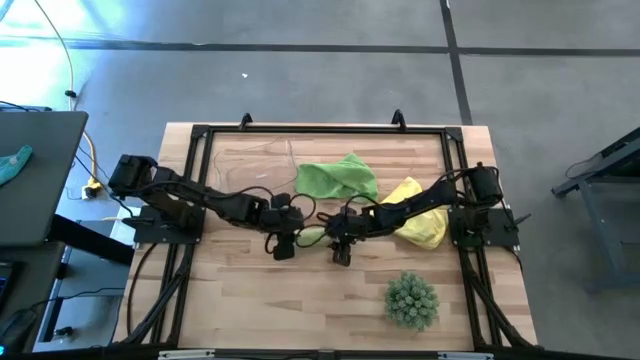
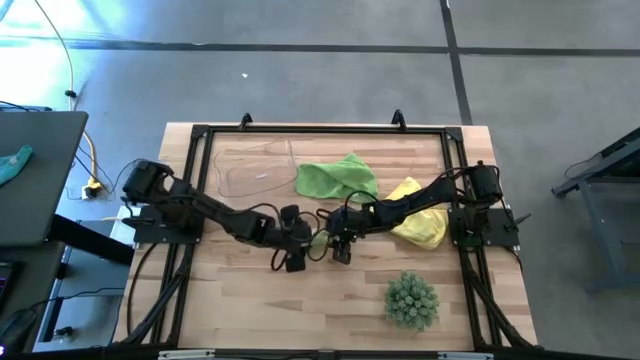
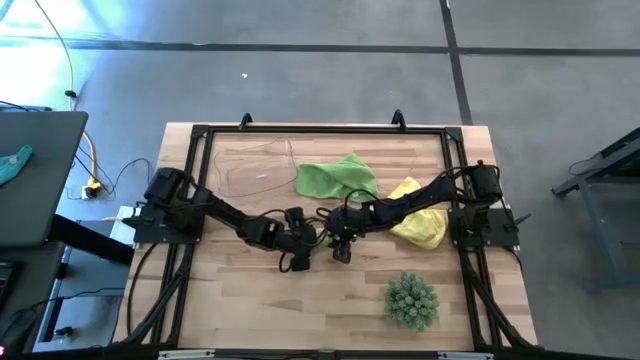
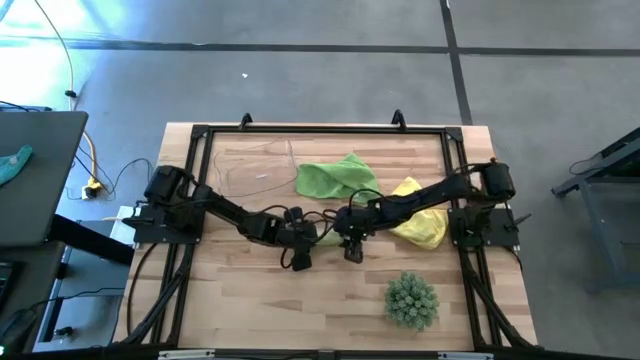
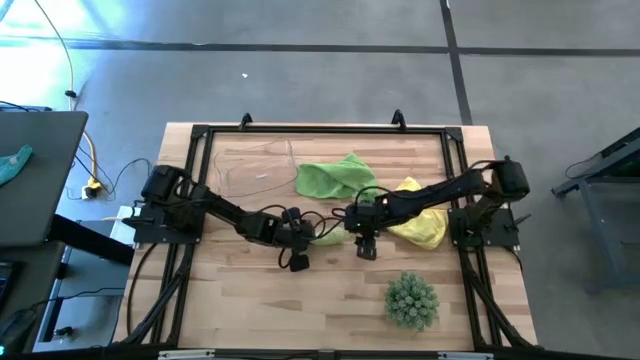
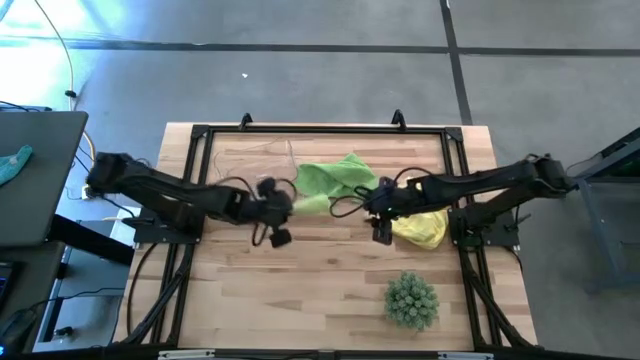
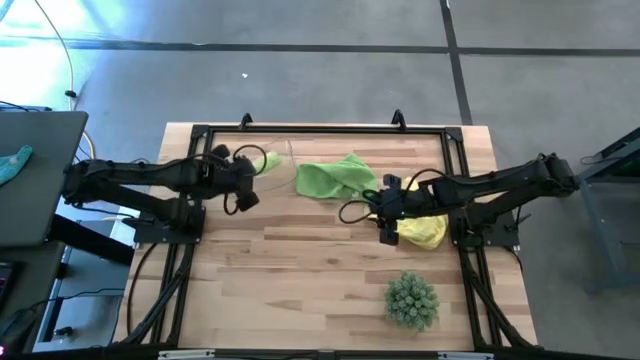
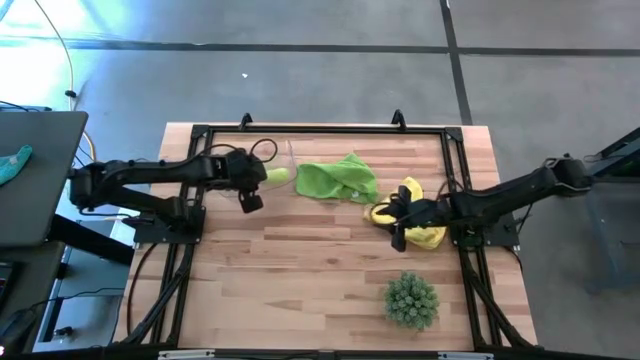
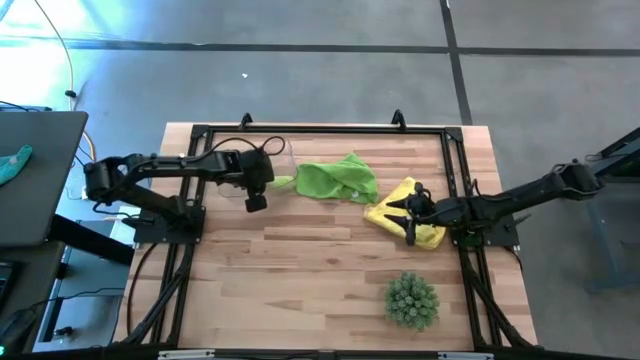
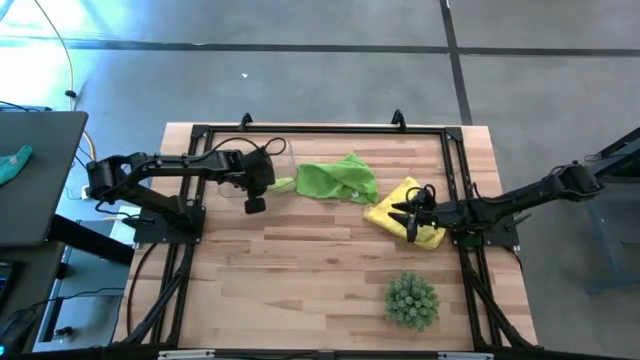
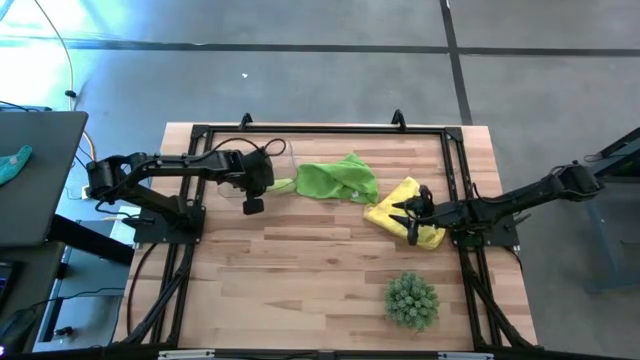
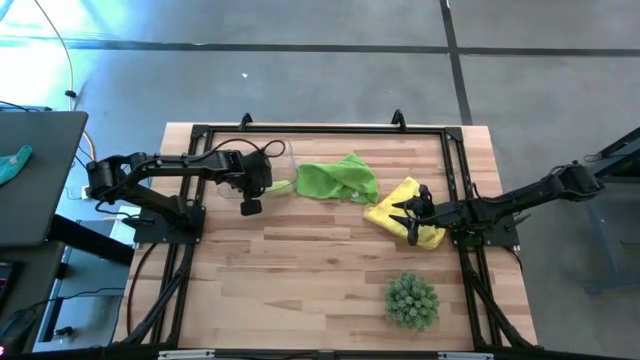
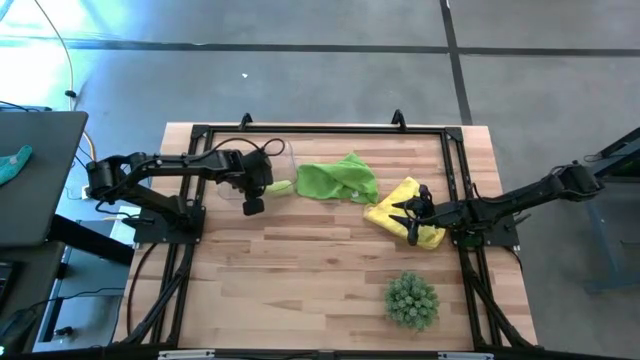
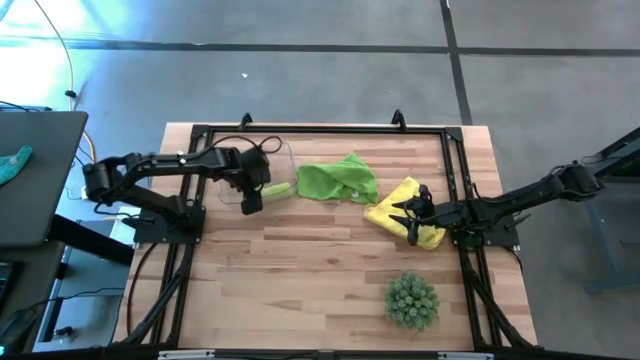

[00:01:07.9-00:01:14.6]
Task: Roll microfiber towels into tight, uniform cylinder then place into a basket
Put the light green towel into the transparent bin

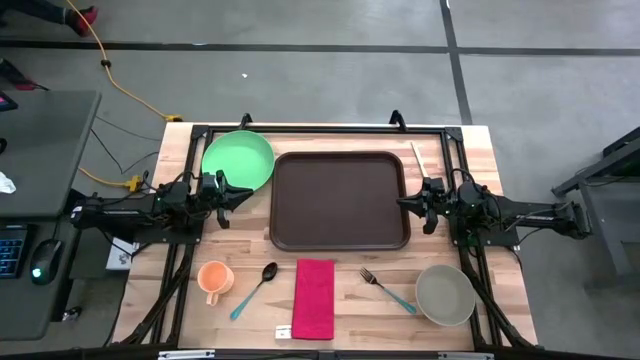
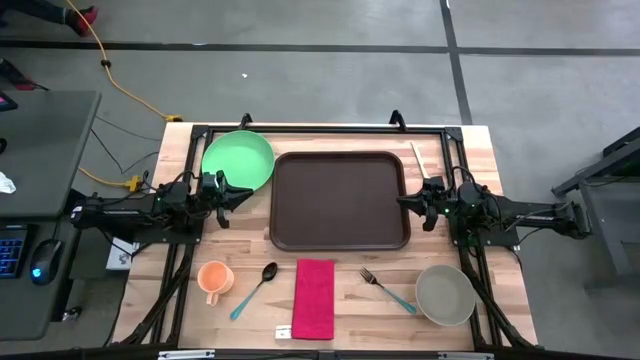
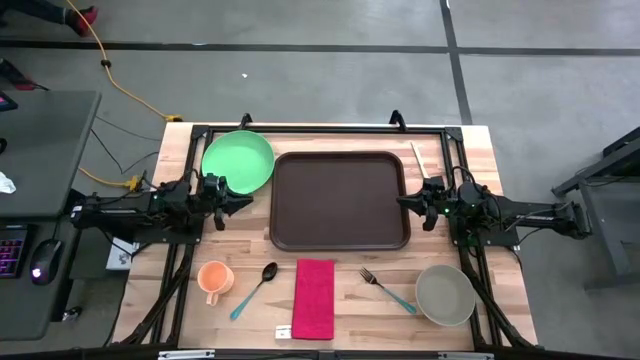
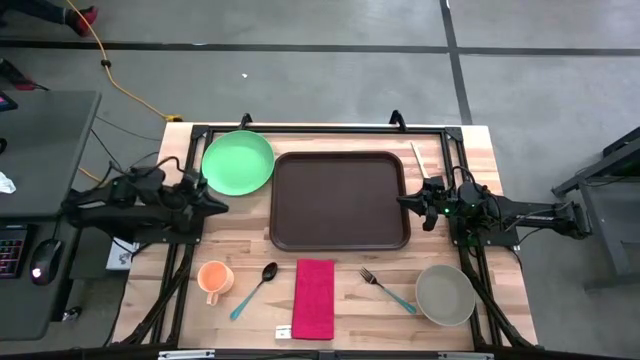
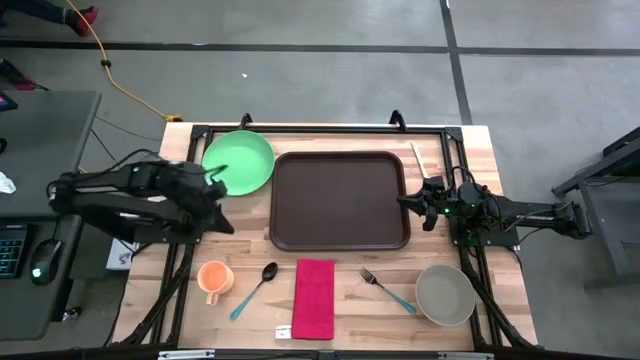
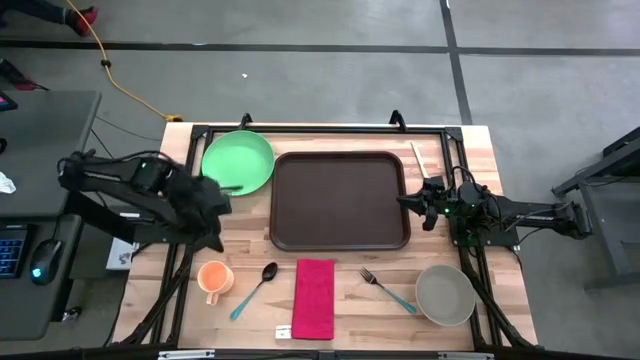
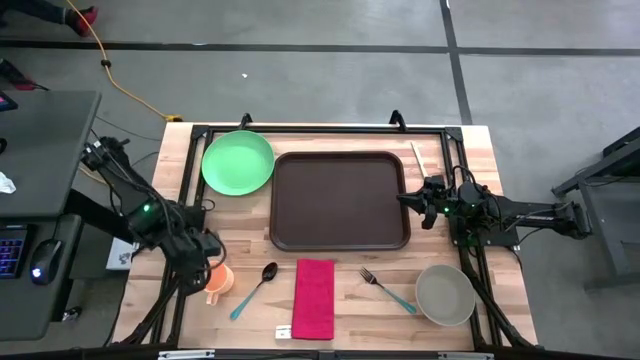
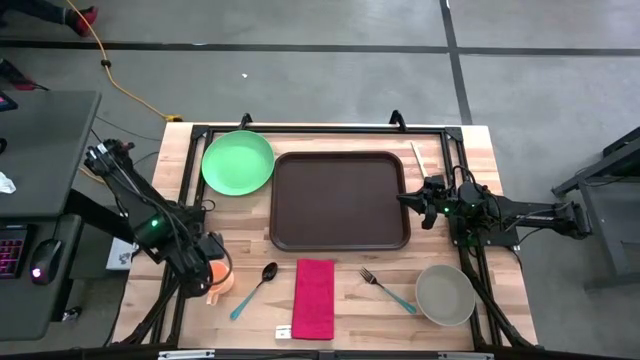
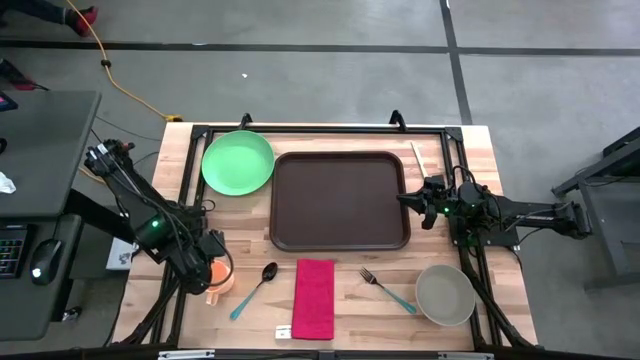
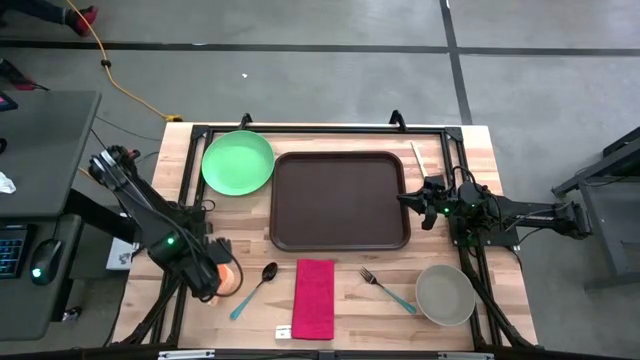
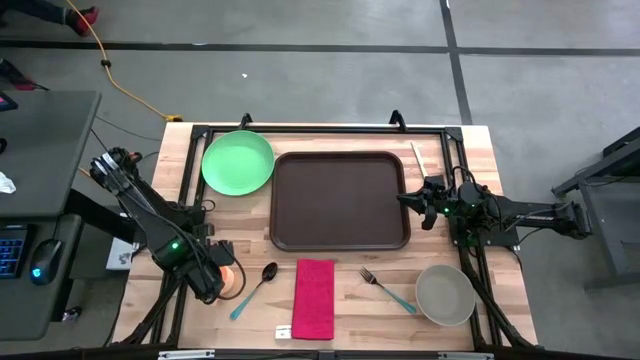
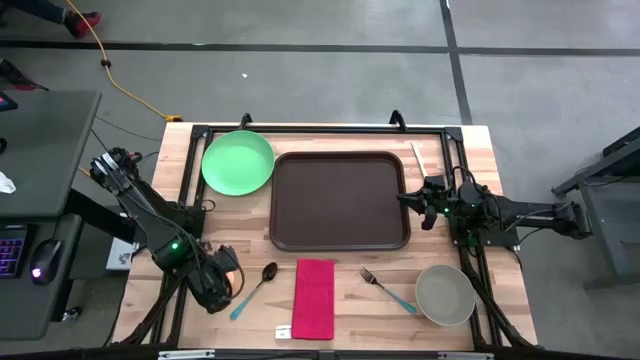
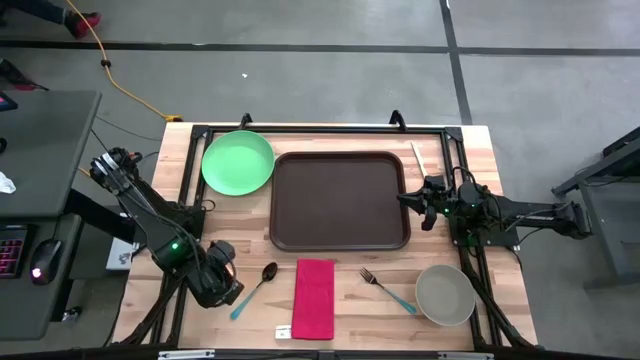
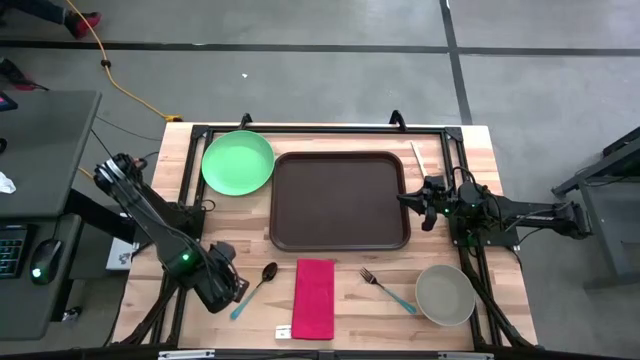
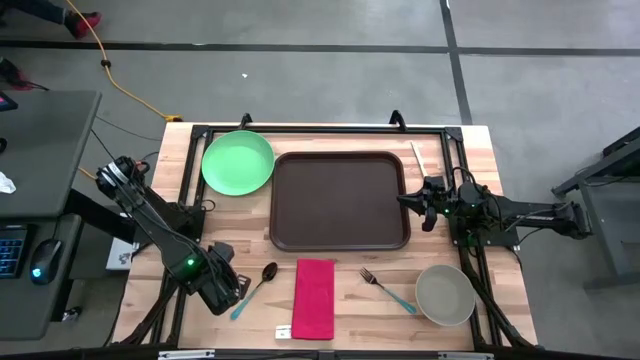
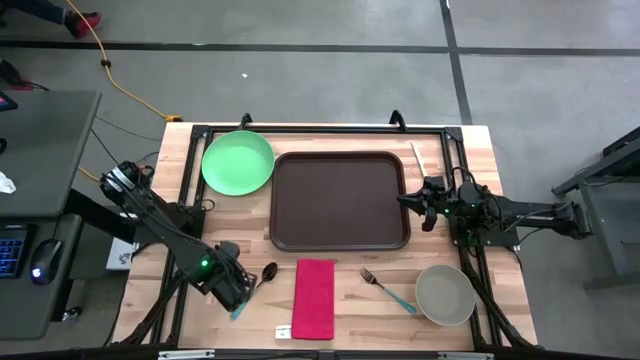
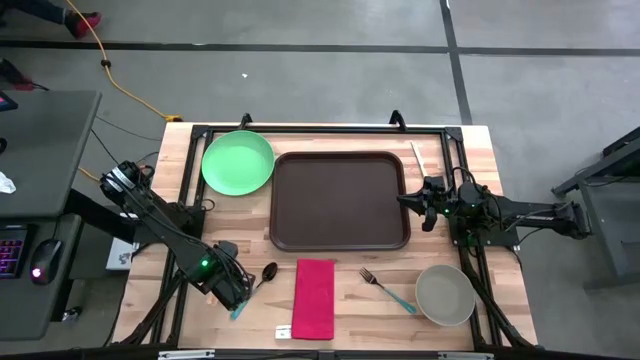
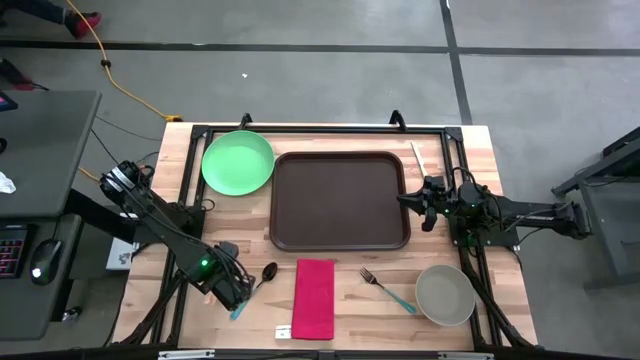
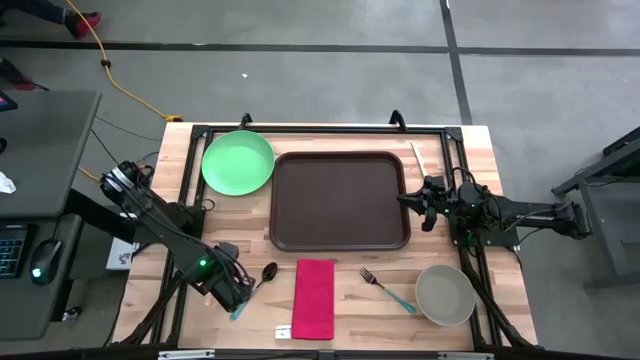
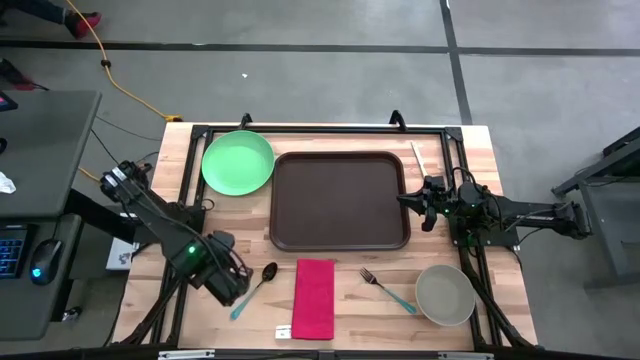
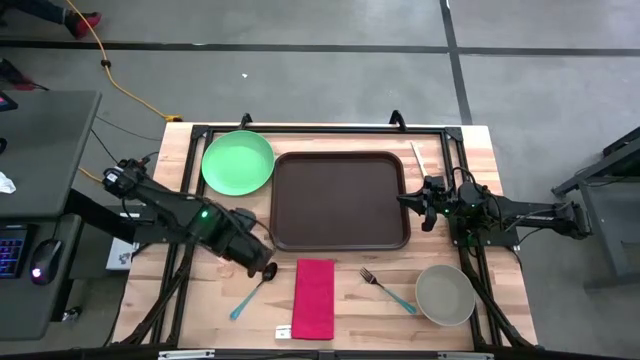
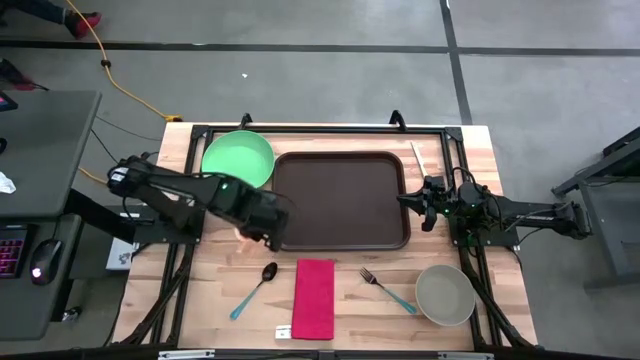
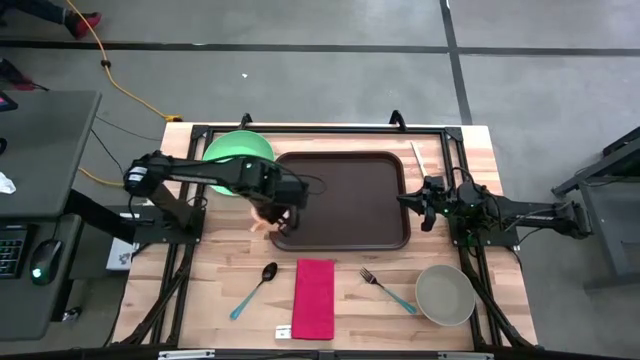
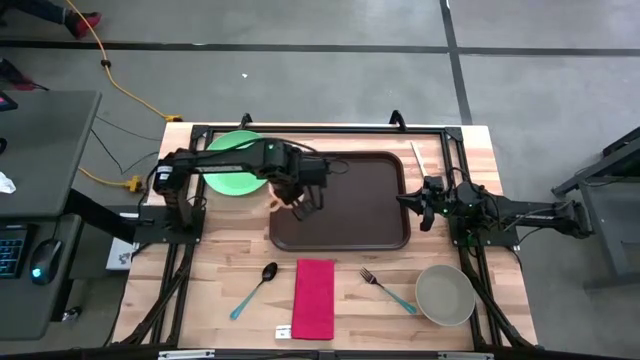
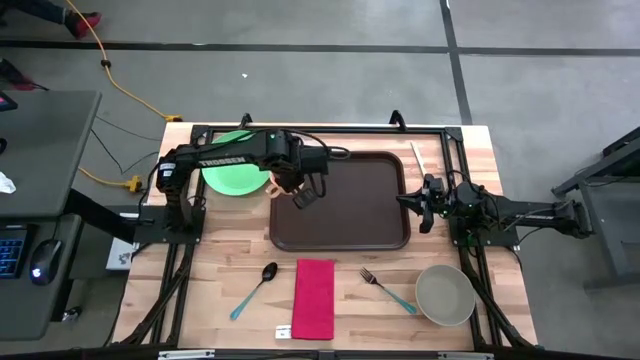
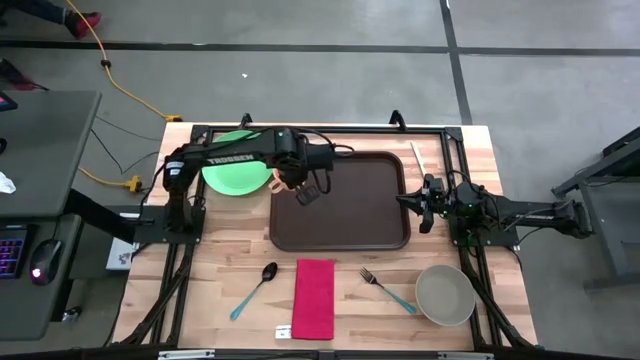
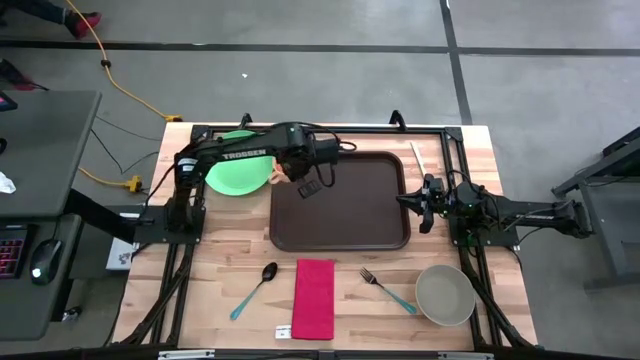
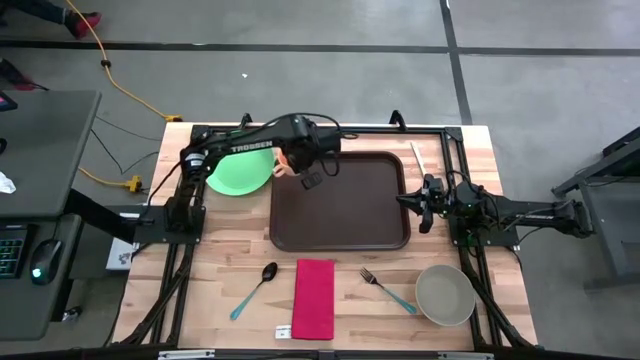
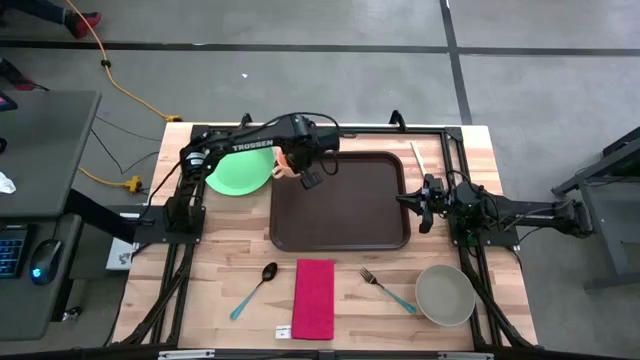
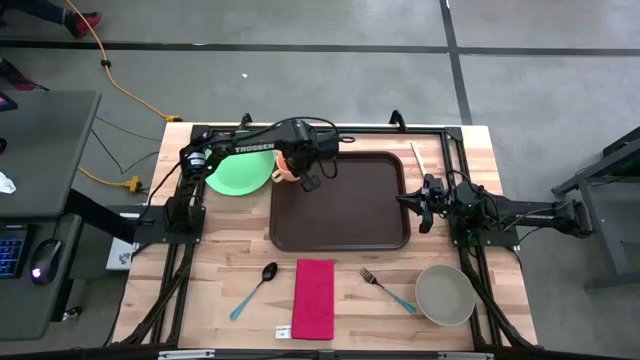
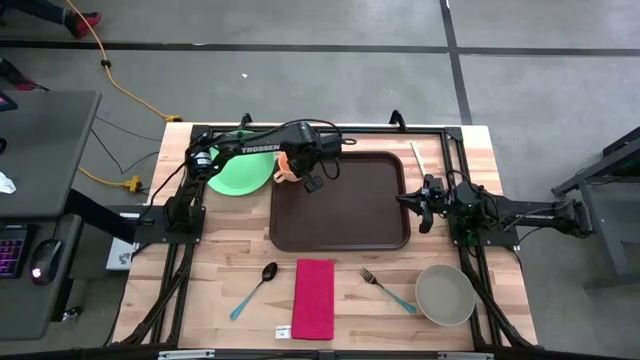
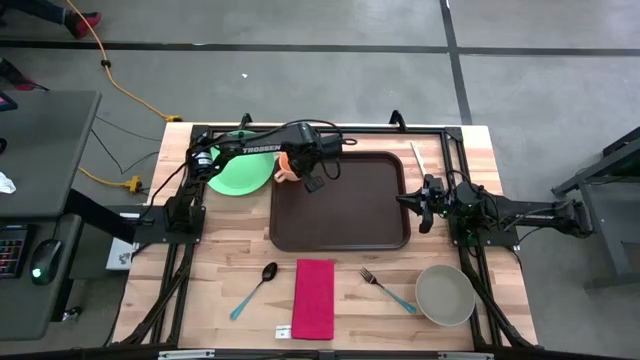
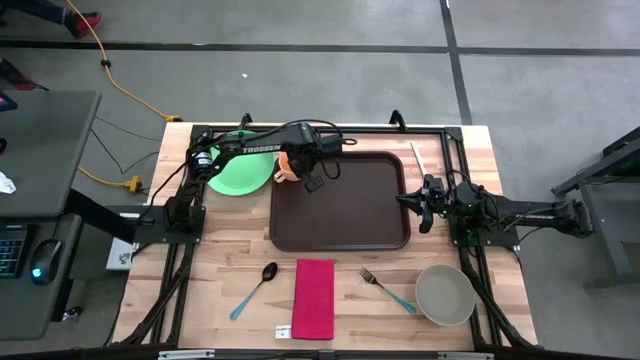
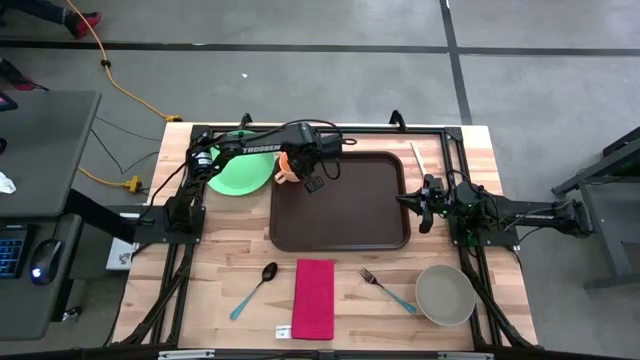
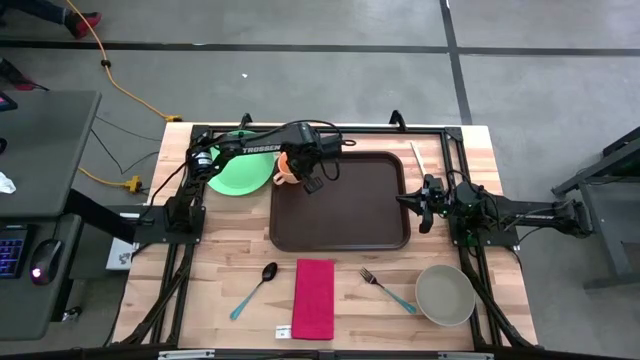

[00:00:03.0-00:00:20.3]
Task: Set up tray
Put the yellow cup on the top left of the brown serving tray
